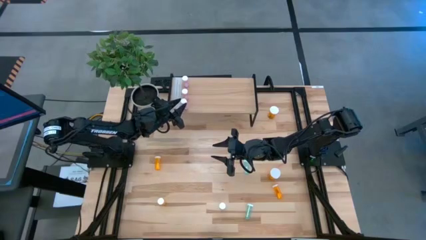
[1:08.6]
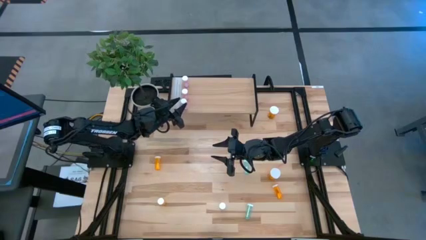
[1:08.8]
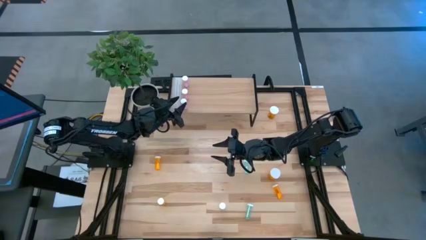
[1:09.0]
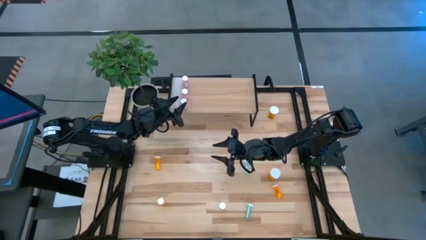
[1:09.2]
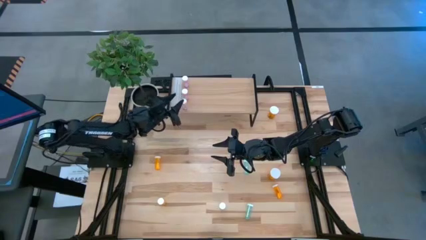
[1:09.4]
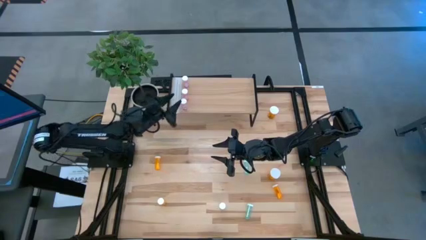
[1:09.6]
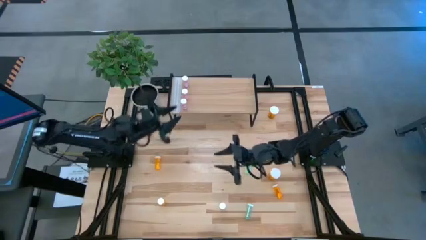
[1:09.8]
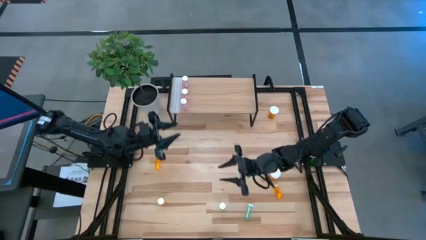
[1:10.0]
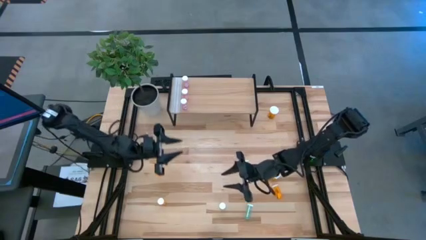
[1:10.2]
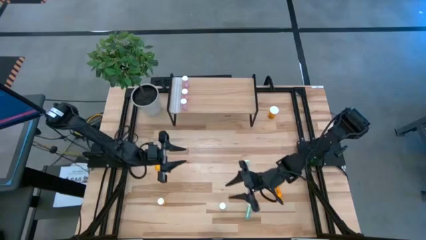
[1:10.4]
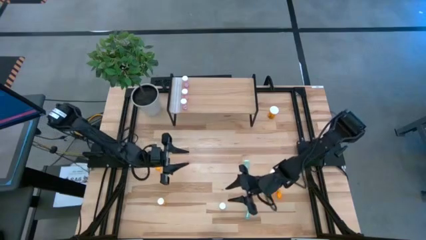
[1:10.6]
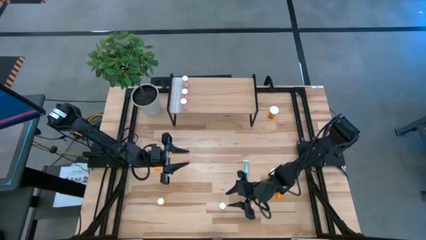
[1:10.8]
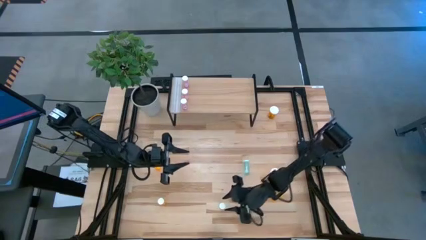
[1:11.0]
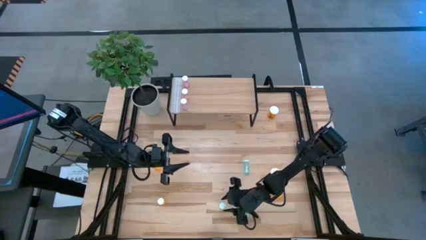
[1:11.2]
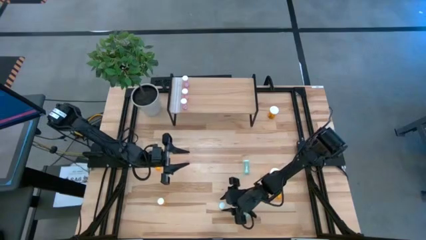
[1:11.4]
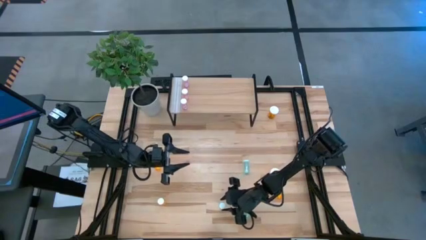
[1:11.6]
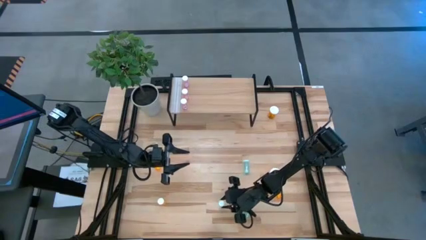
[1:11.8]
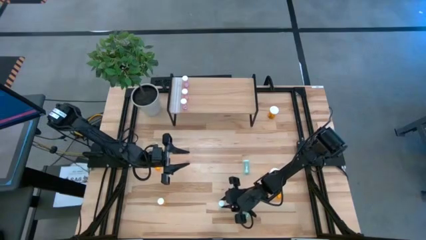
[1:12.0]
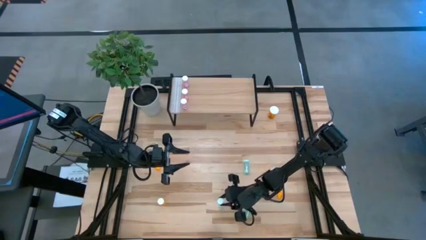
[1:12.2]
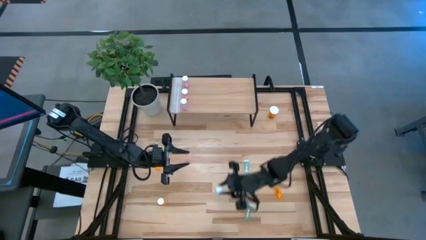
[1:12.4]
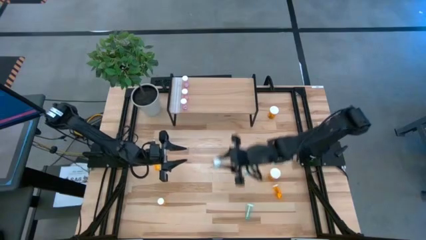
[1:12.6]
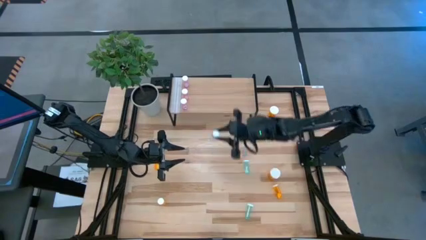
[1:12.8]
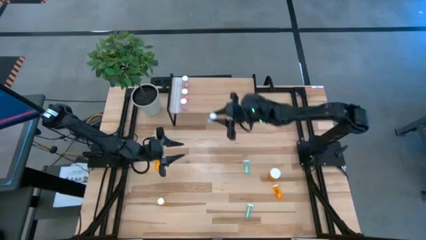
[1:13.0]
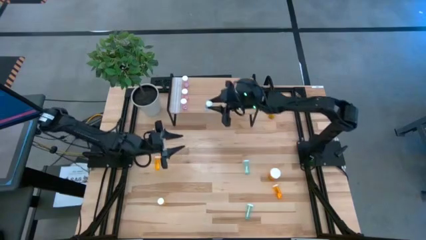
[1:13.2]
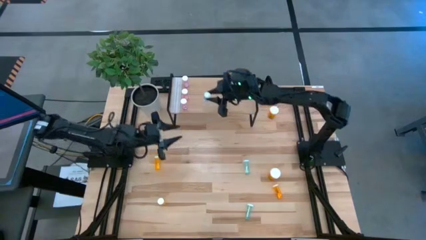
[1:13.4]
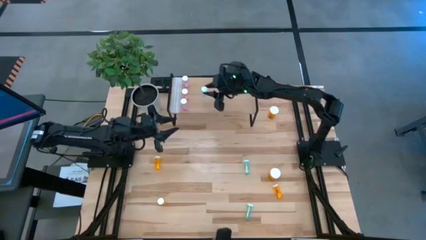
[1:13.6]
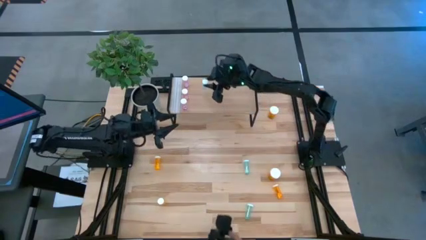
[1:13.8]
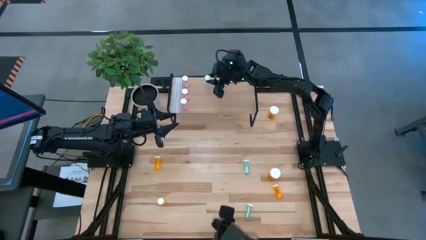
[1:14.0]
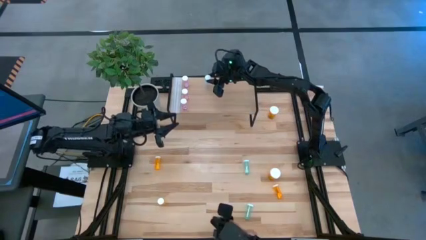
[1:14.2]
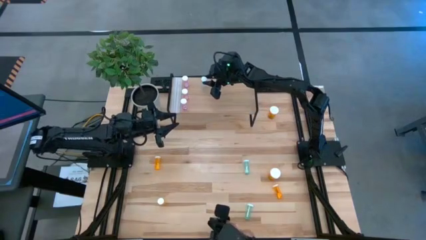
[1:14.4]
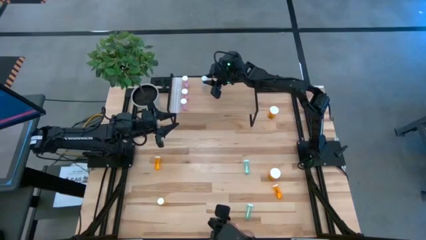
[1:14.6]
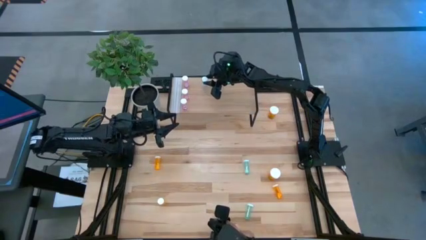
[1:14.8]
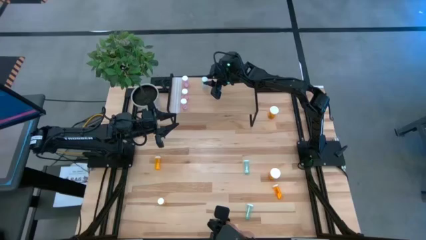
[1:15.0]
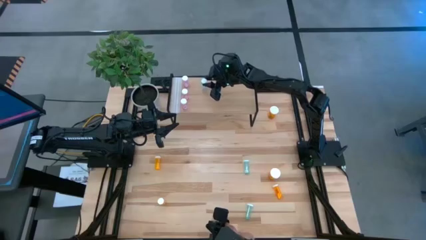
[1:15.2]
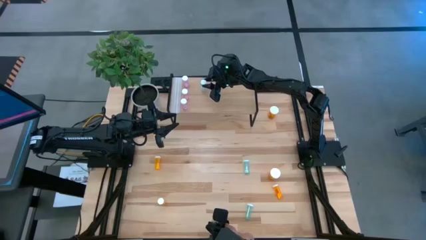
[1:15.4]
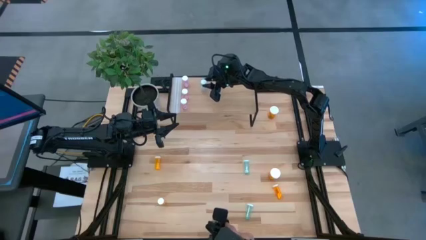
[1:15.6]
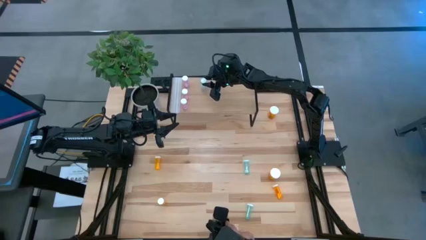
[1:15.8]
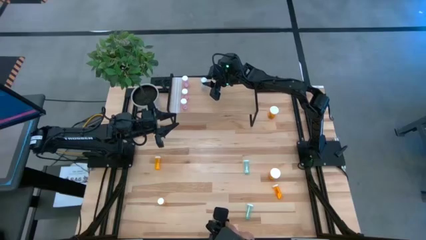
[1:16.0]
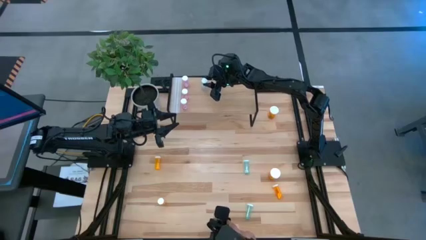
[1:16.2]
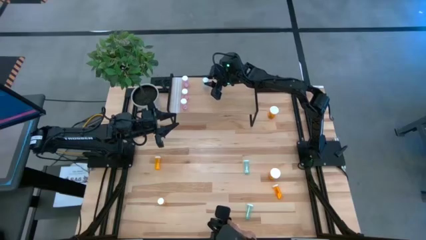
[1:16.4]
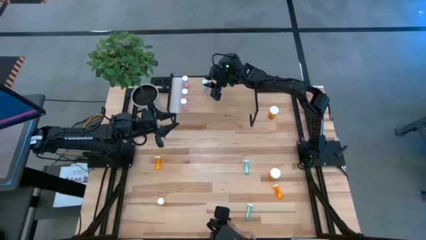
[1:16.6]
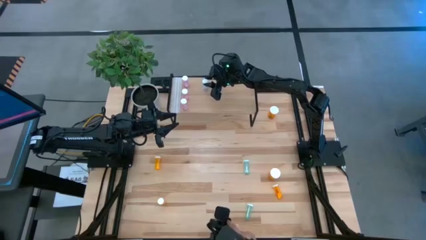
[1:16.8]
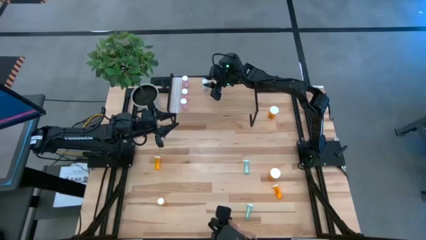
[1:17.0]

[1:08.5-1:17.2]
Task: Pick and place medicine bottles onto shelf by color
Put the left blue pill bottle on the shelf
